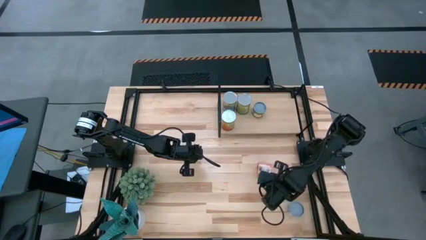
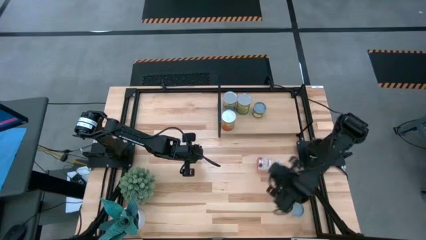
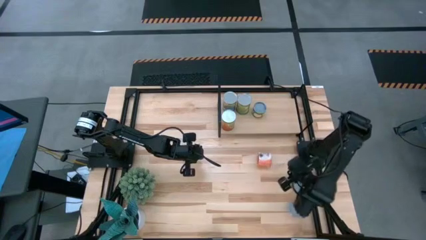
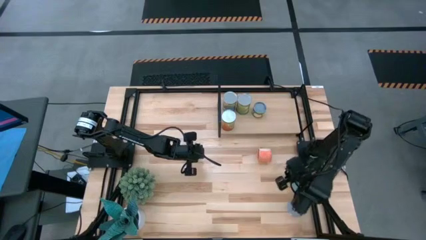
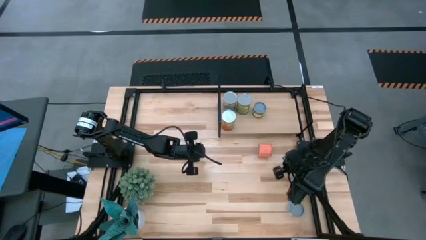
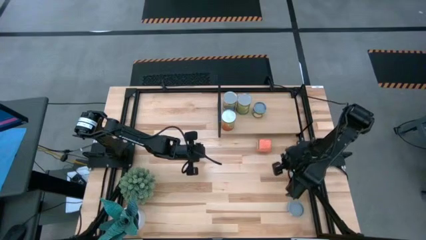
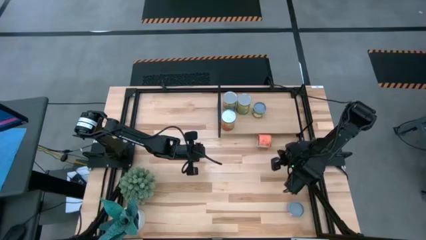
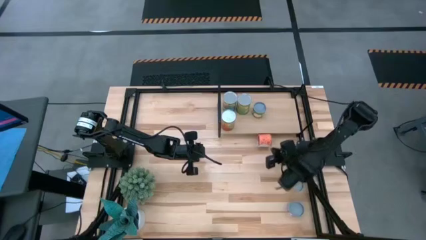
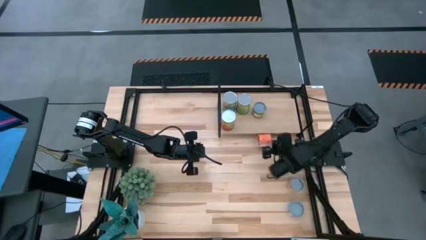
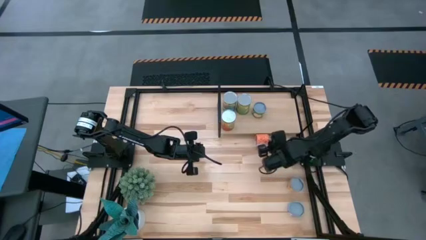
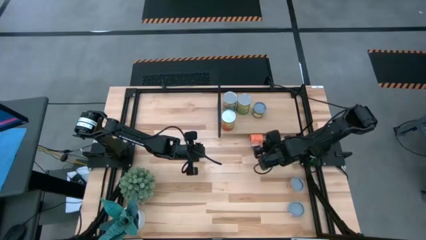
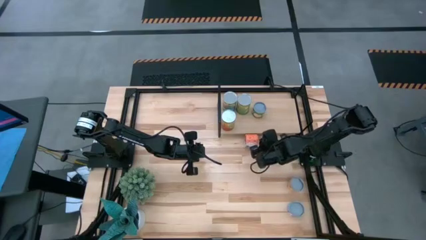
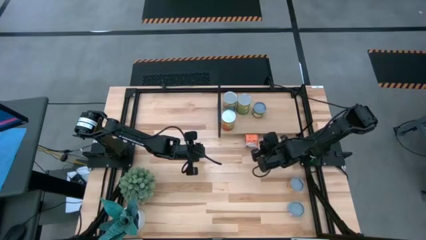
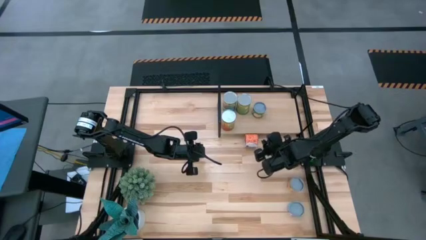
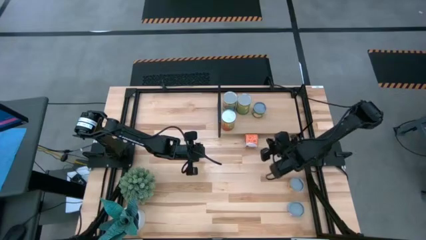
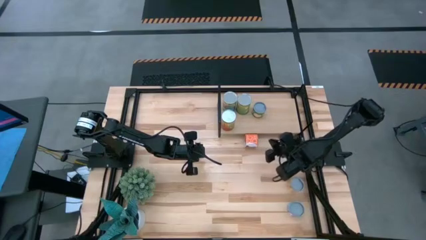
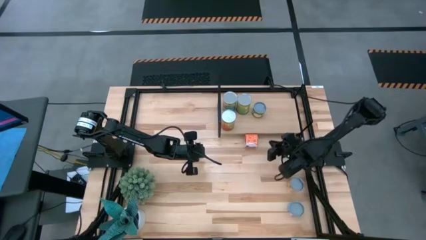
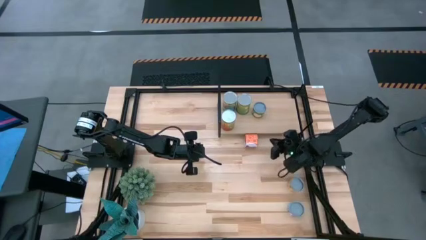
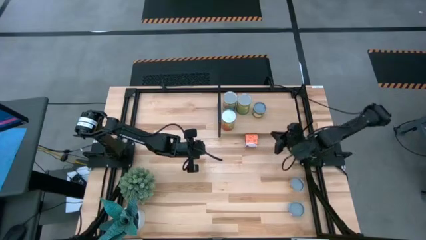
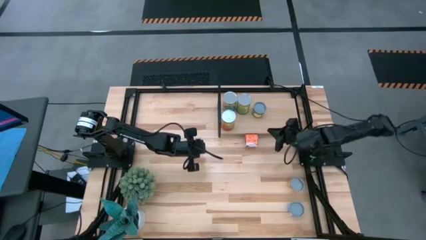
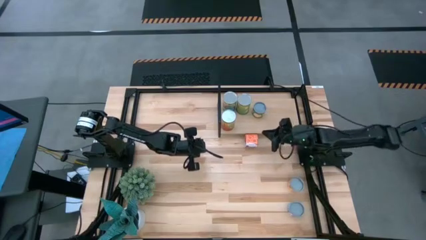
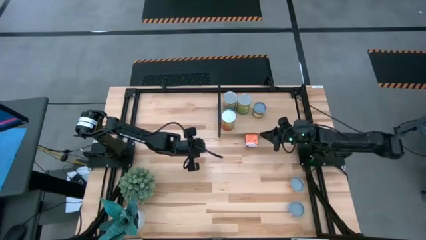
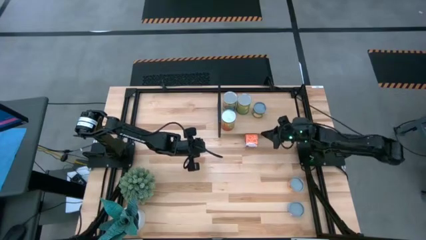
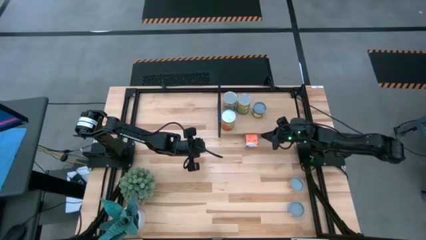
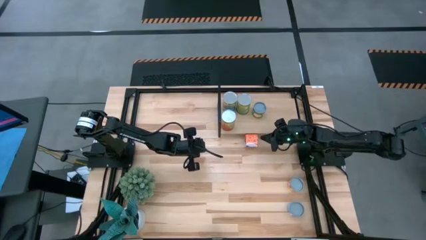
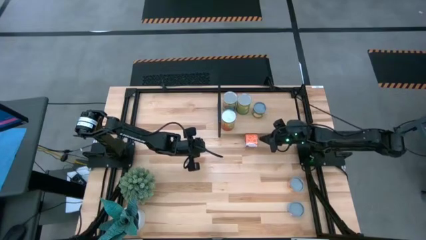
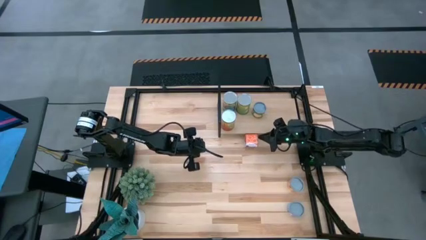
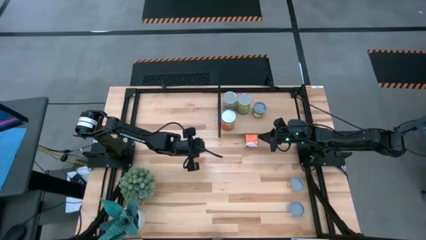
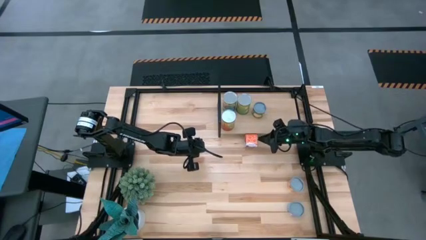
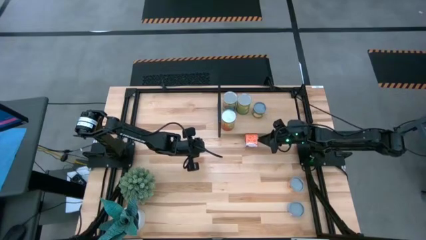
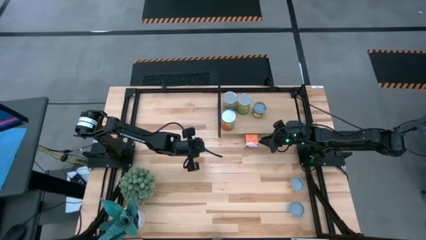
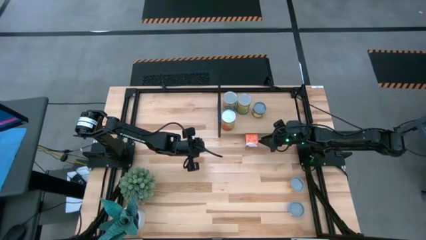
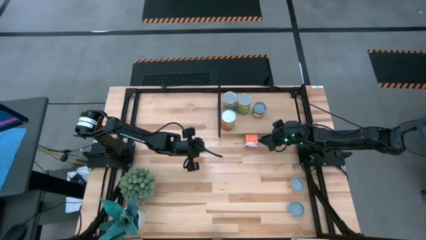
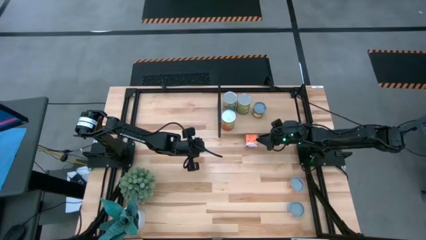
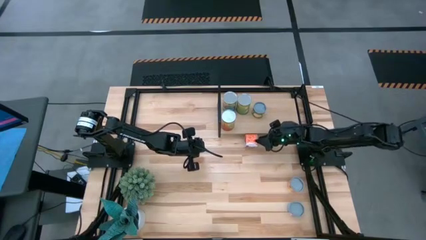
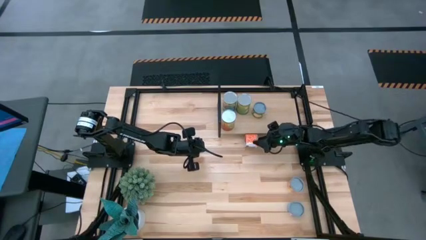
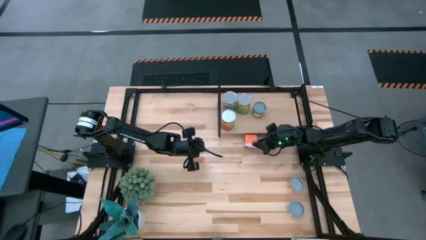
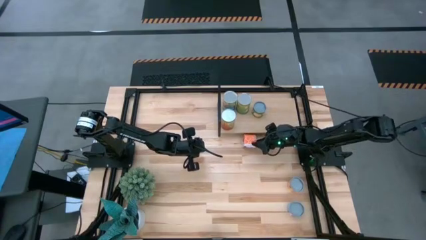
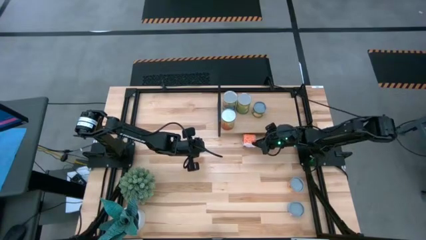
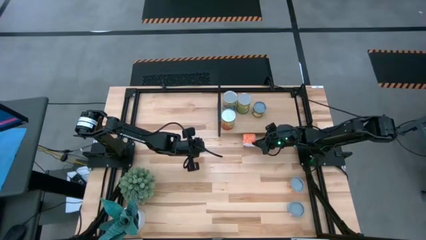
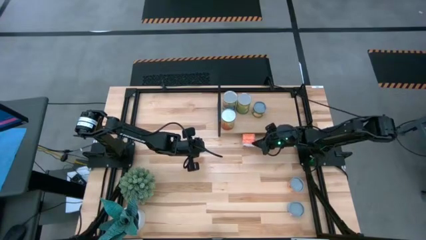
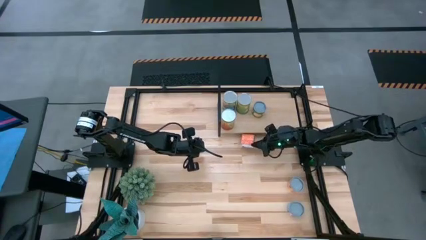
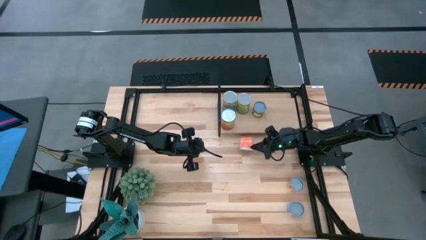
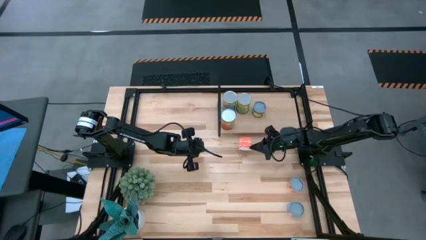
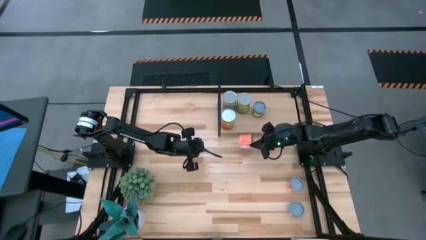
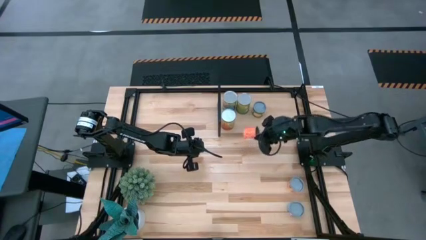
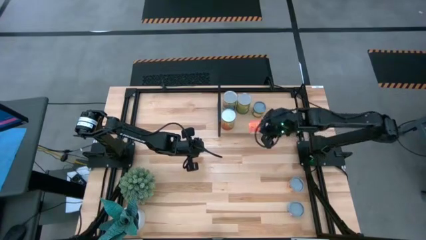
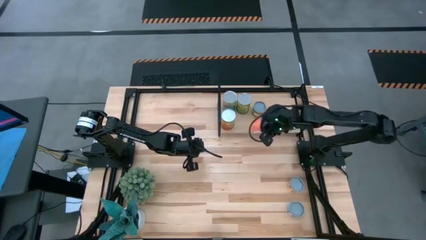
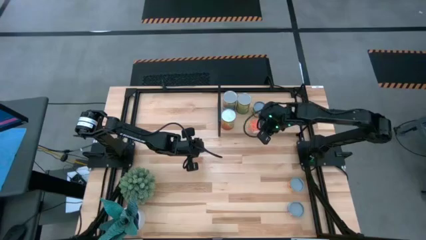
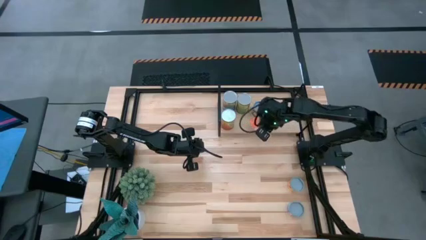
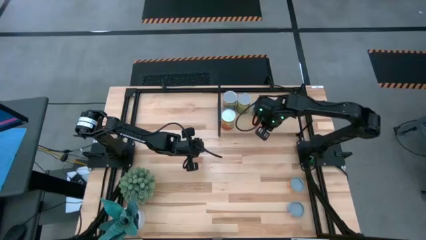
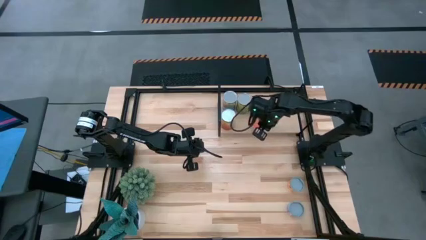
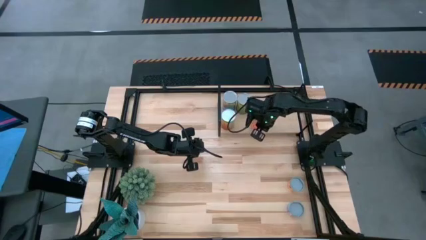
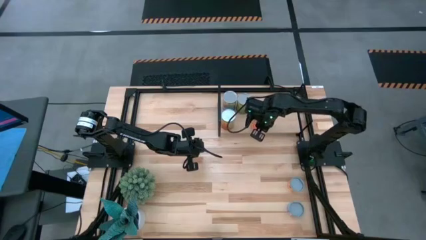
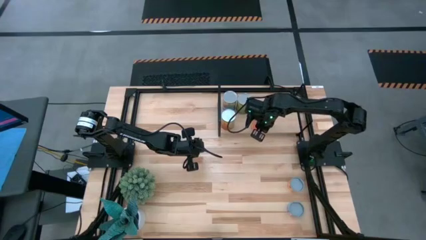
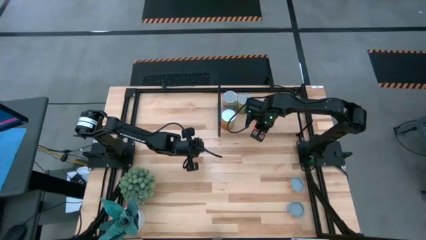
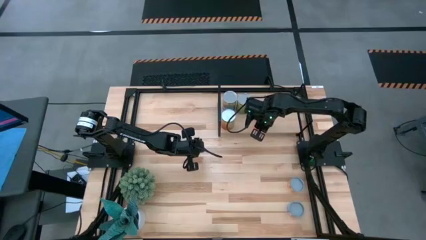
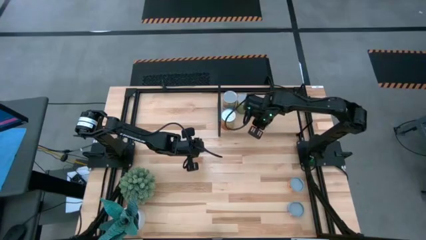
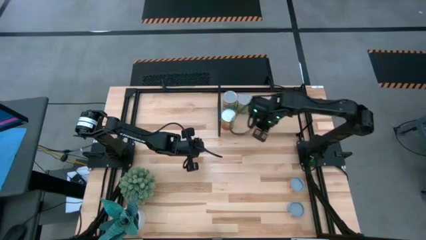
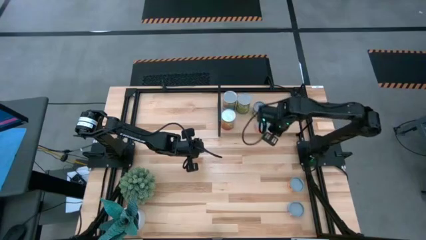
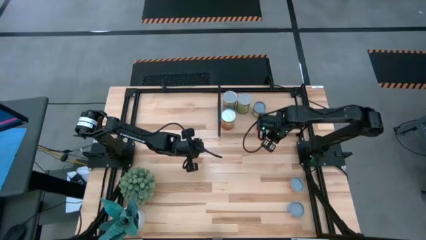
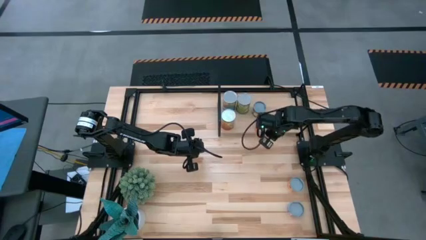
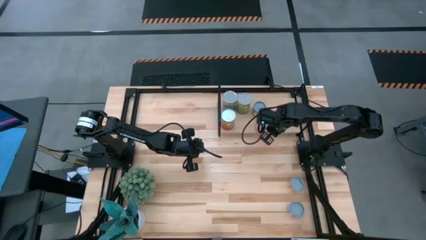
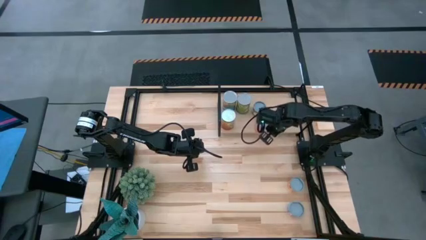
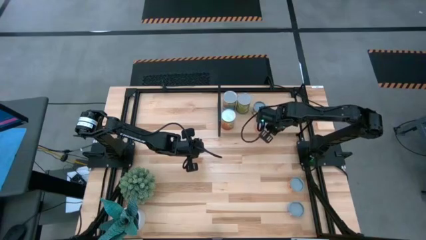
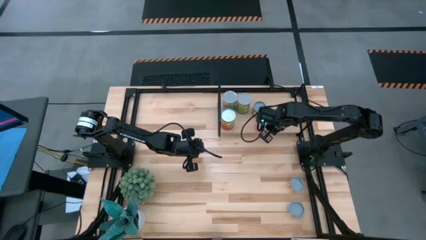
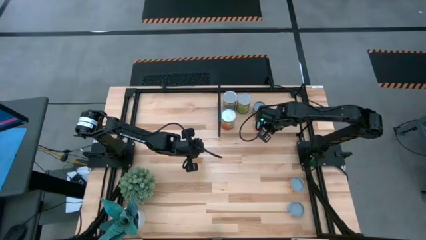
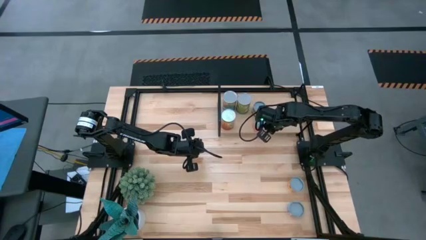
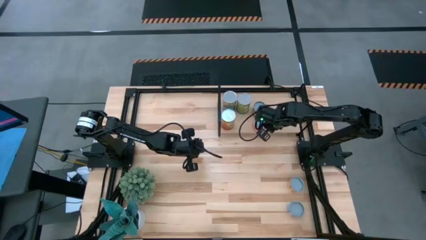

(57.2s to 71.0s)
Task: Pick and place cans onto a shelf
Put the canned saucy meatballs on the shelf

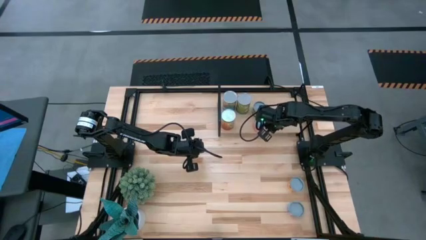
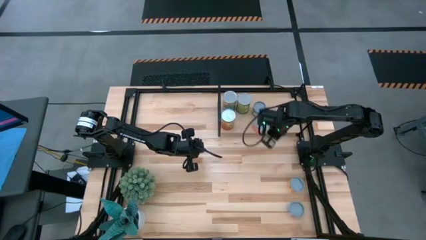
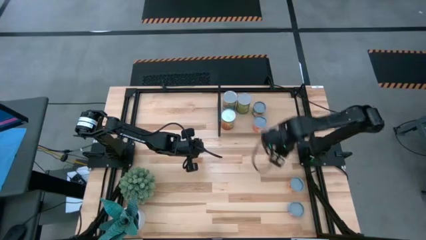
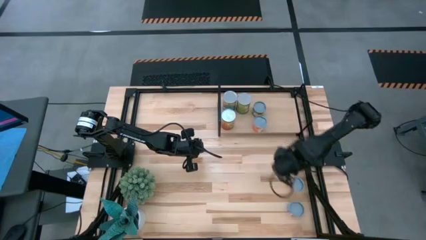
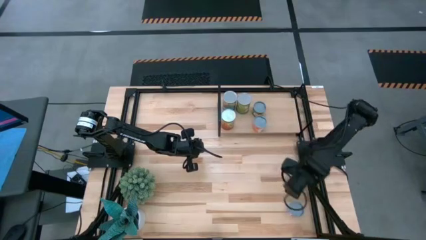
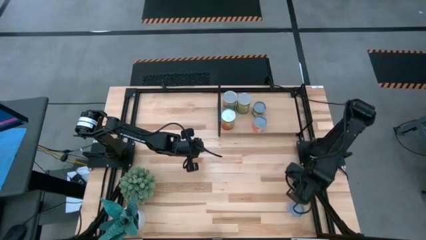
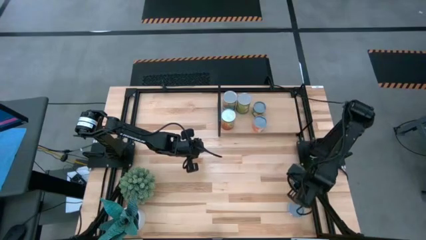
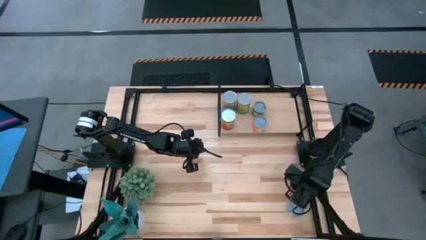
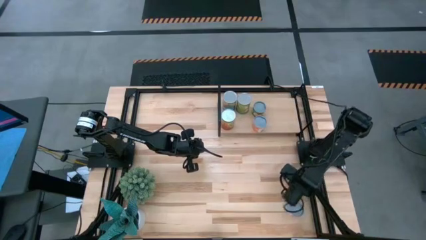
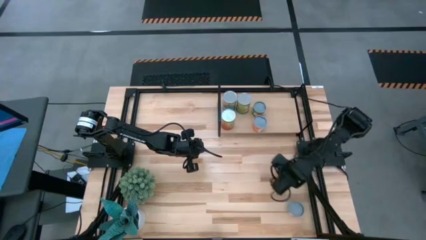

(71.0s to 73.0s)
Move the canned pineapple rings to the middle right of the table
